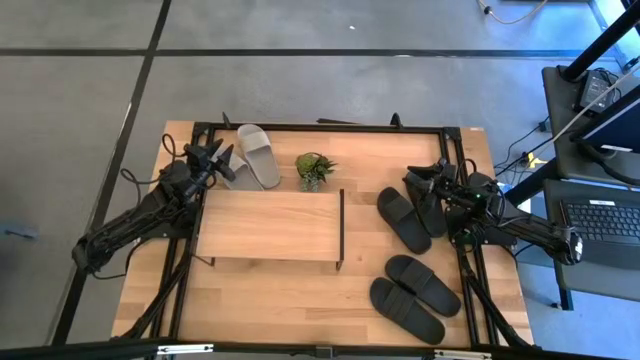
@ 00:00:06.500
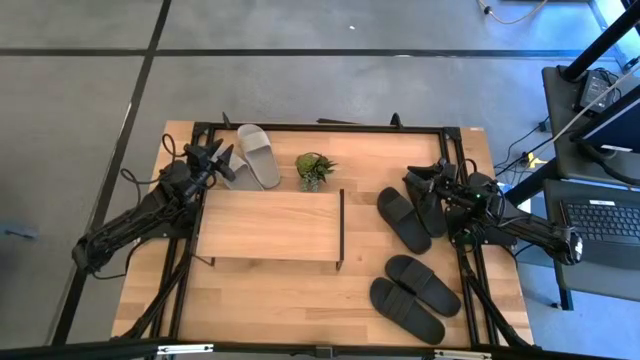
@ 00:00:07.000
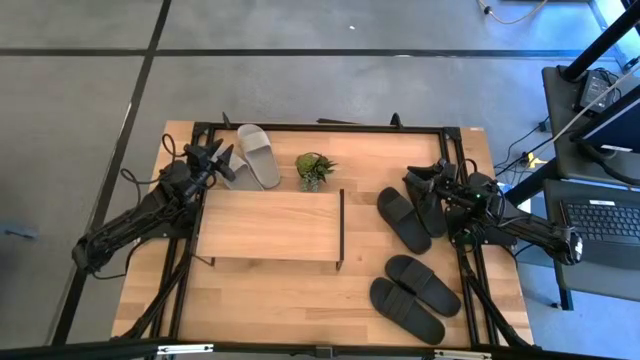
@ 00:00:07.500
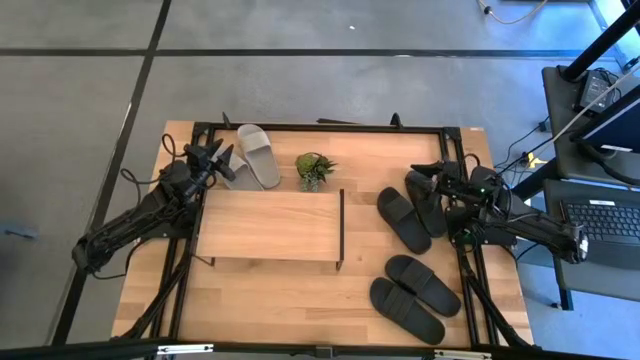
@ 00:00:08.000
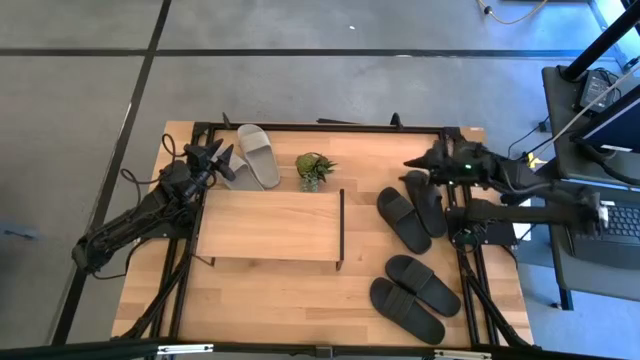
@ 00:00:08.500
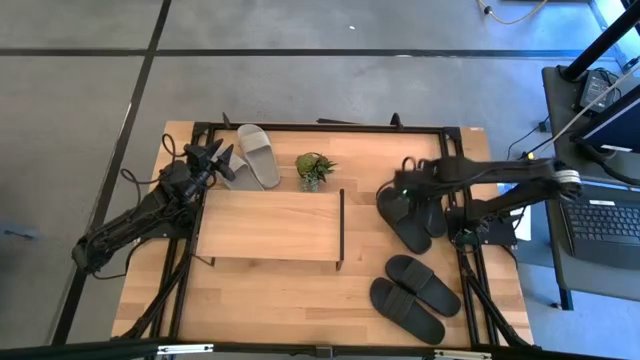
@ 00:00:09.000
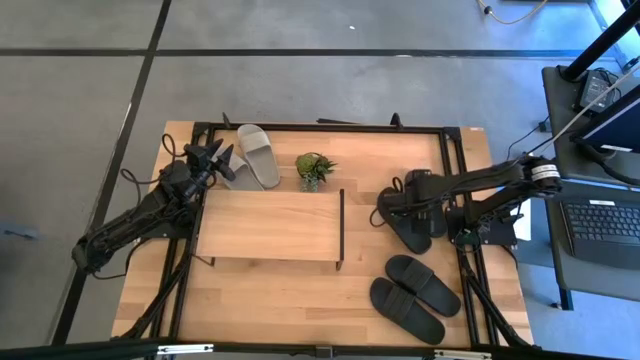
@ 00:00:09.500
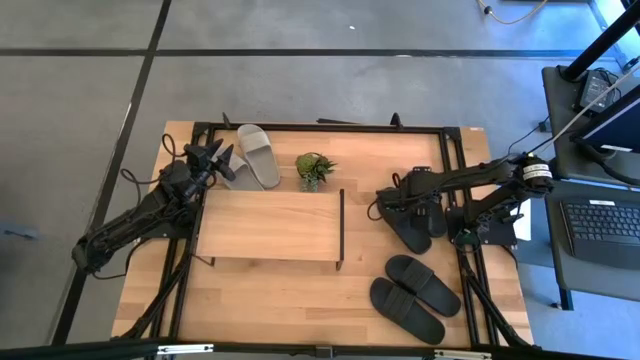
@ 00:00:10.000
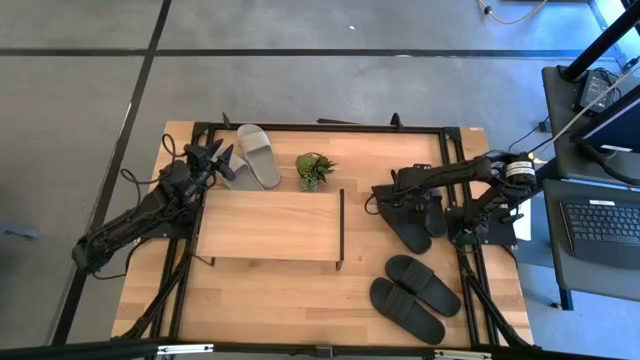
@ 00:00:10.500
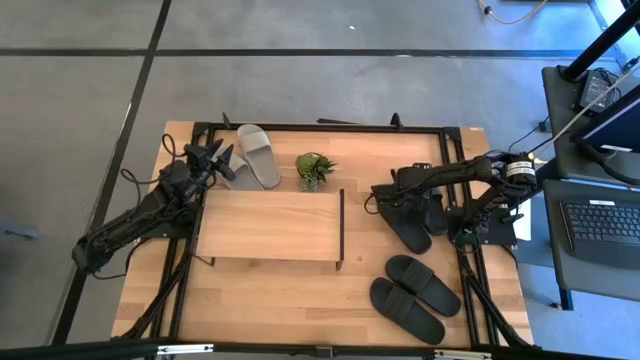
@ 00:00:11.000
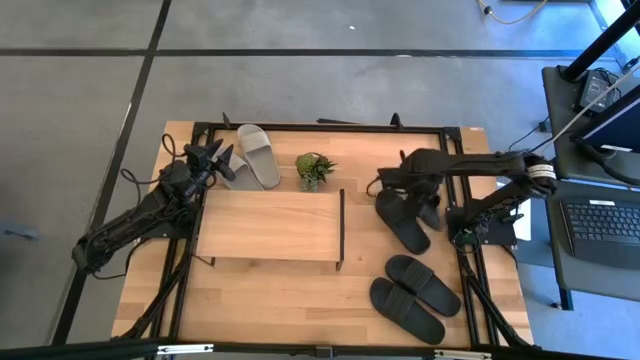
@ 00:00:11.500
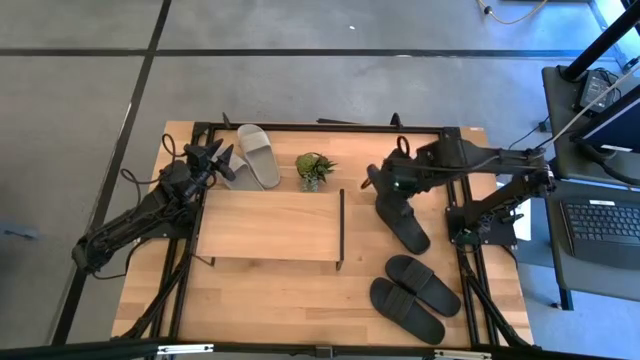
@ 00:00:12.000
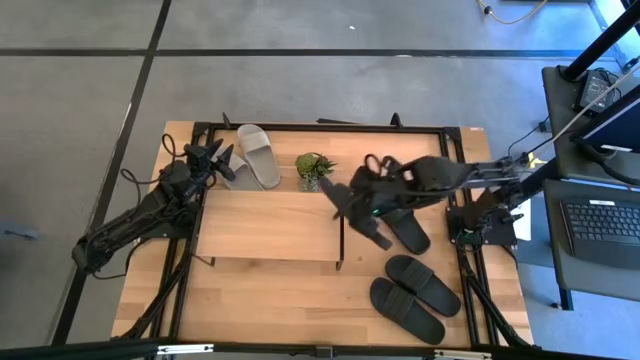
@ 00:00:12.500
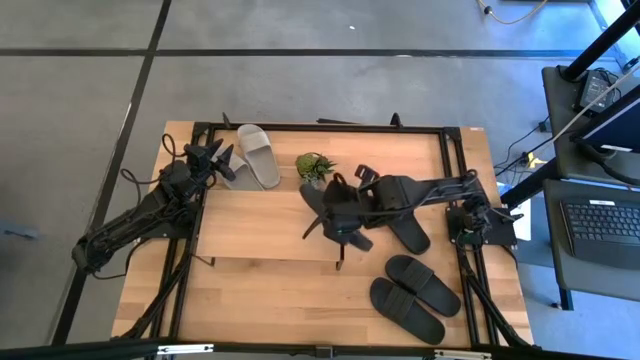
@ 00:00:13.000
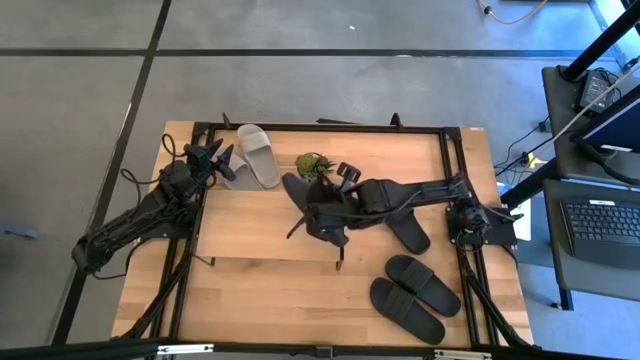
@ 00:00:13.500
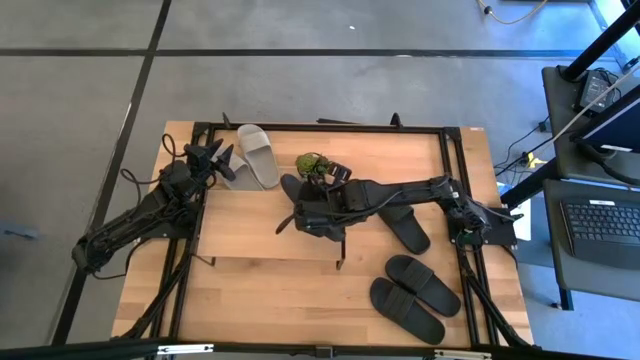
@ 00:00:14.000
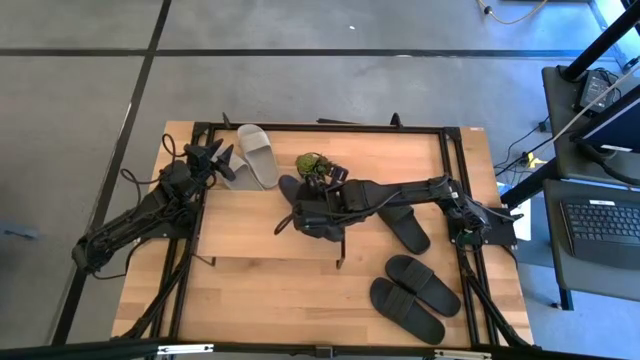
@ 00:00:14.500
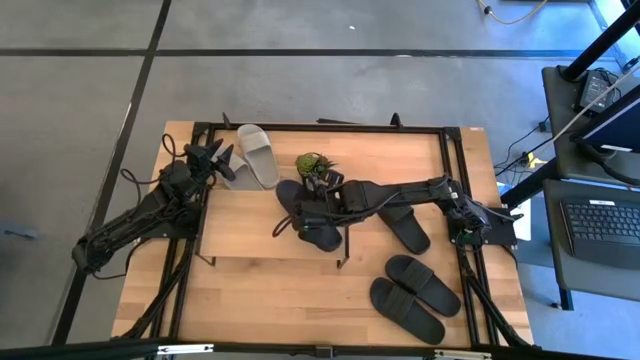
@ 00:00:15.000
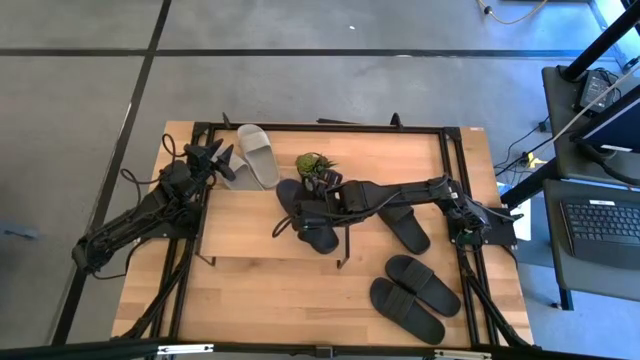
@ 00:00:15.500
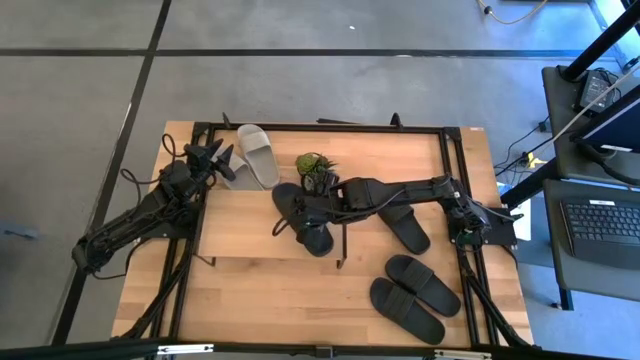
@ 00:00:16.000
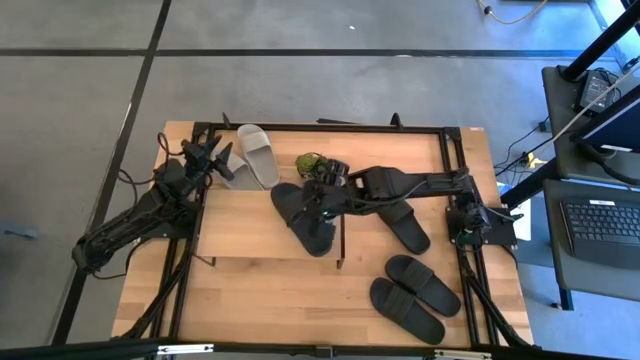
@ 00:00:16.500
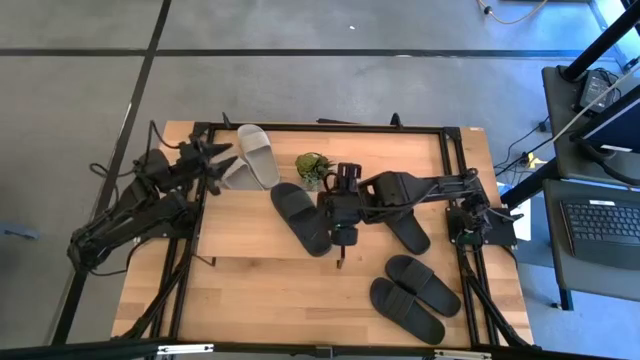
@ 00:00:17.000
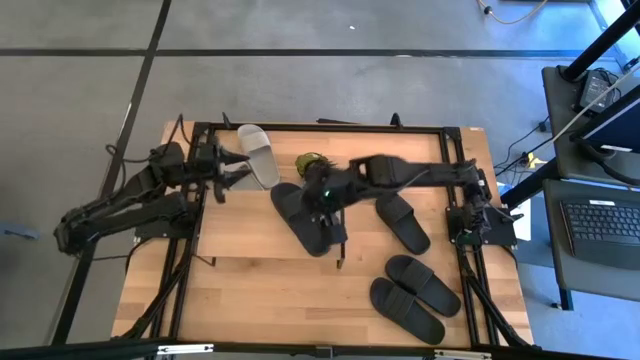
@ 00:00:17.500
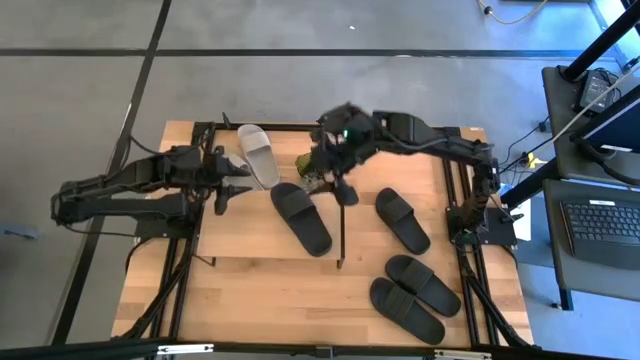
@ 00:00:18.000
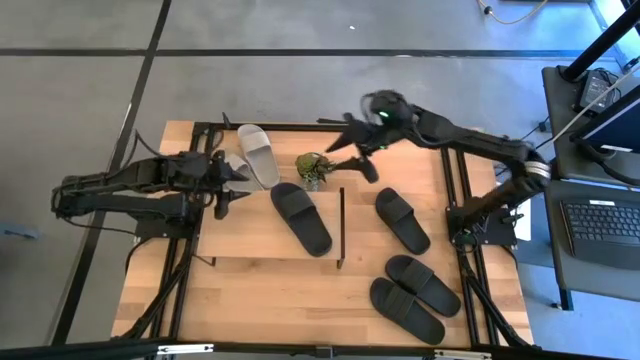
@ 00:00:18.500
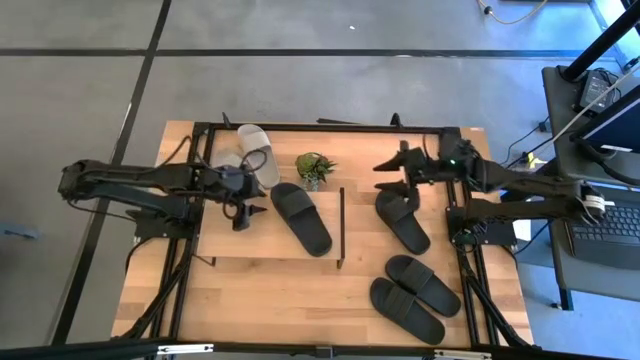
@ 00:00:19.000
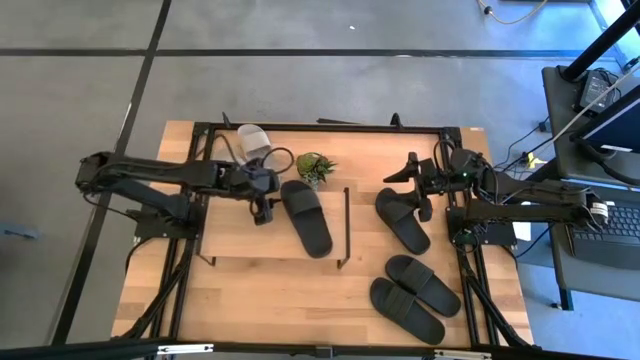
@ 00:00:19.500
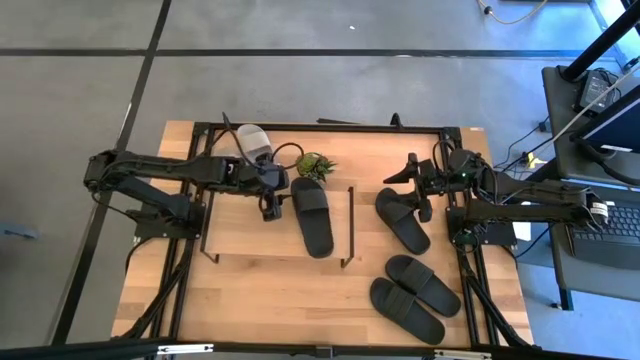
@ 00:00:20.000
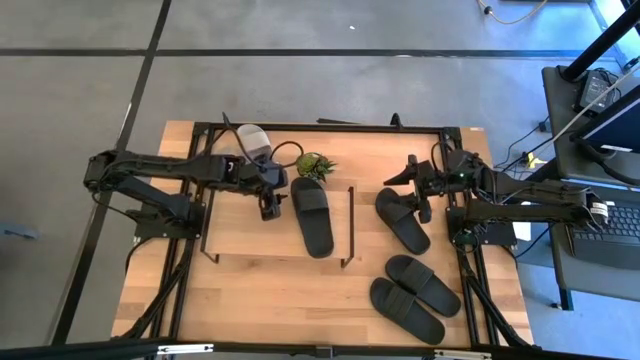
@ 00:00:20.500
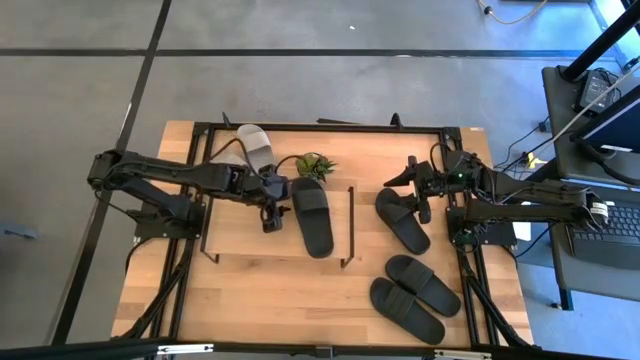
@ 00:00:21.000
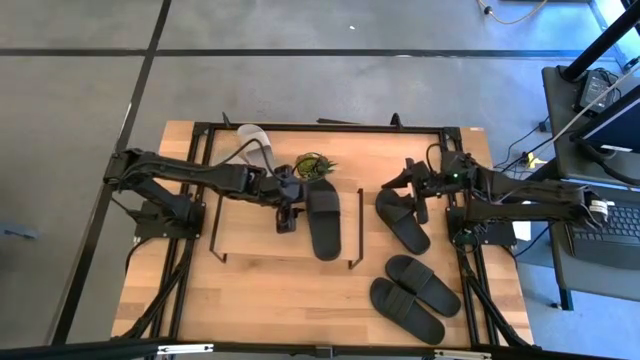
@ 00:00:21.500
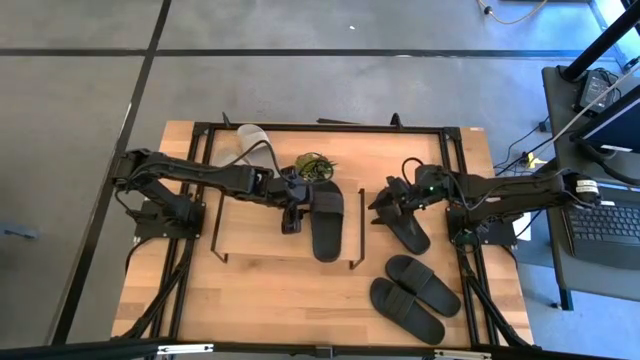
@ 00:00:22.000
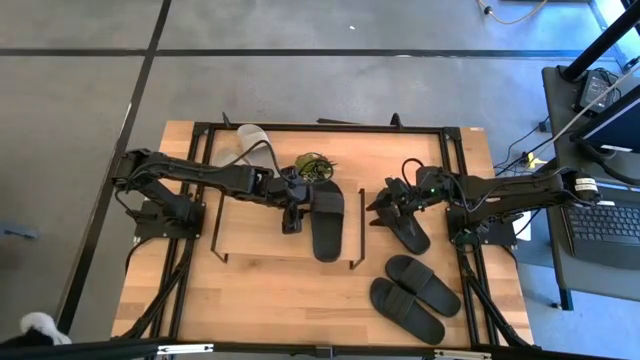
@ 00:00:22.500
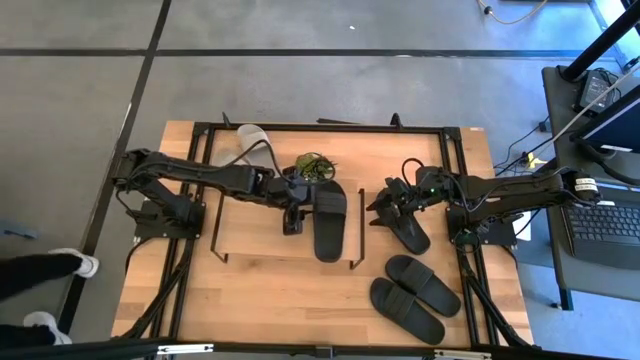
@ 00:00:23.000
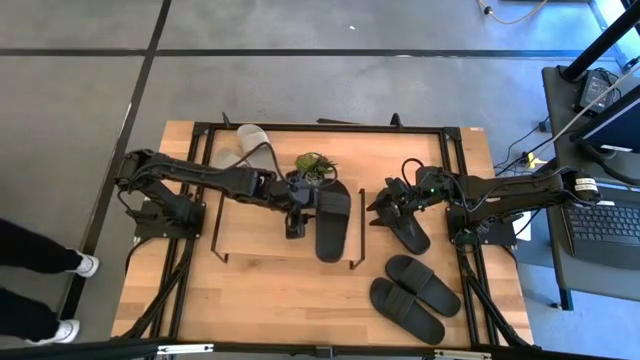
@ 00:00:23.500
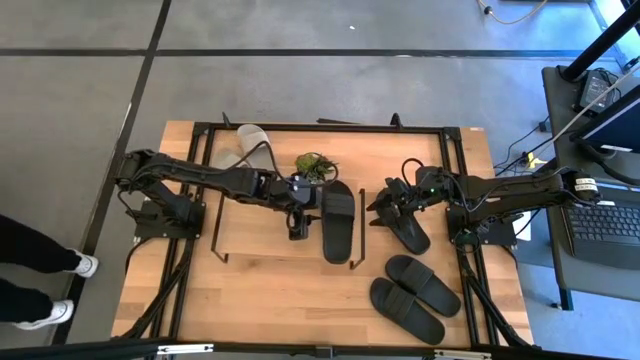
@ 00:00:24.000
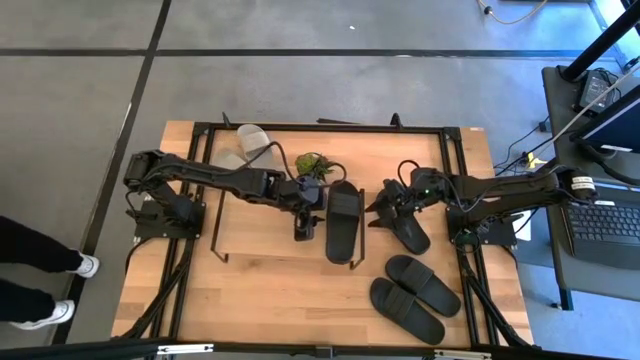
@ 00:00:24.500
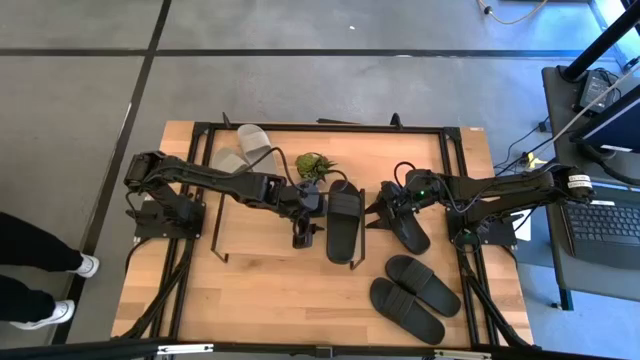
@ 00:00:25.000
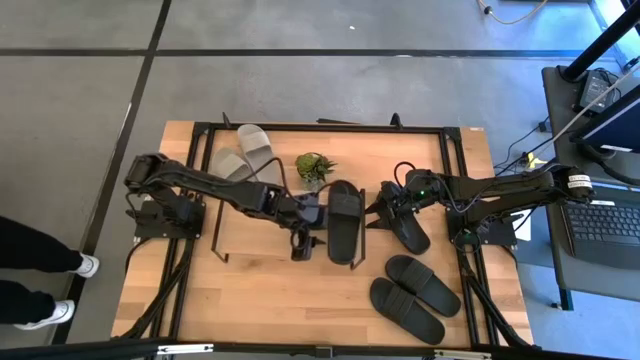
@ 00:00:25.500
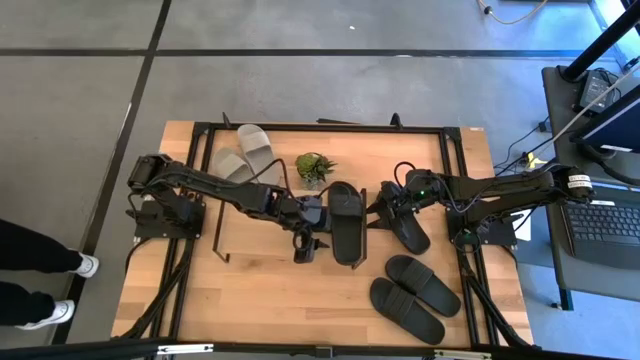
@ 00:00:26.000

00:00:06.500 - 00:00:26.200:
Task: Pick and place slides into the shelf
Put the black slide on the shelf
